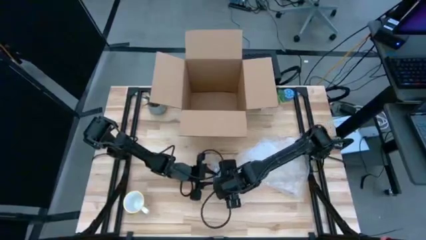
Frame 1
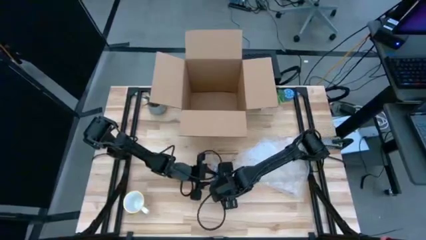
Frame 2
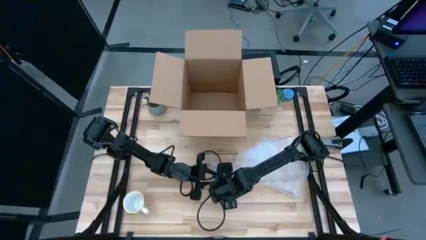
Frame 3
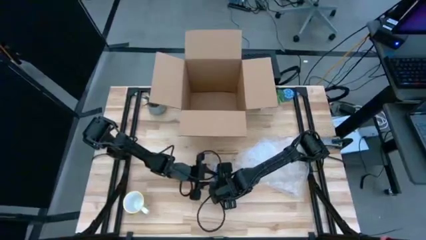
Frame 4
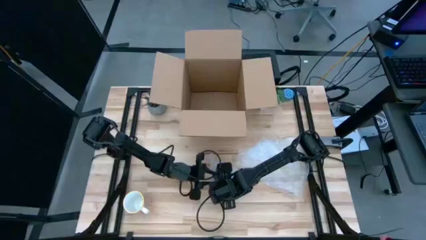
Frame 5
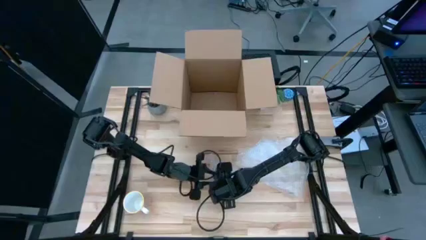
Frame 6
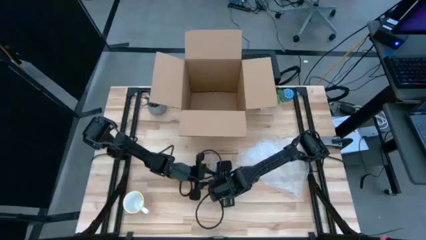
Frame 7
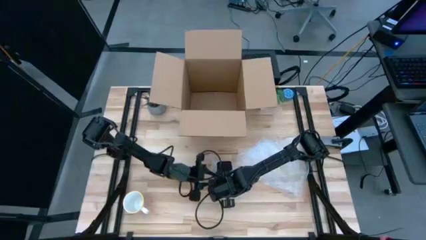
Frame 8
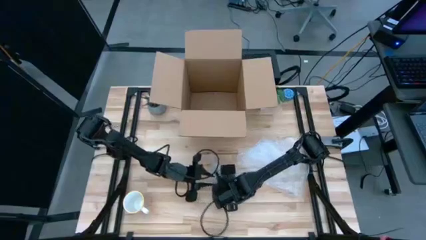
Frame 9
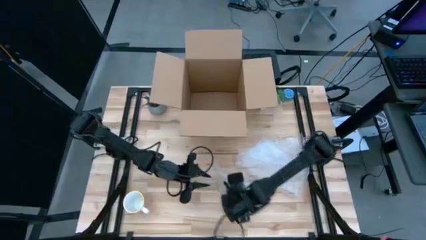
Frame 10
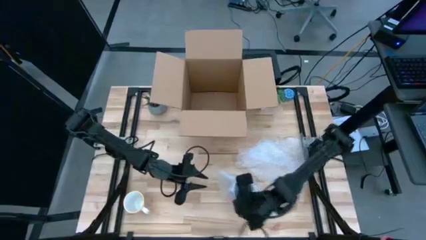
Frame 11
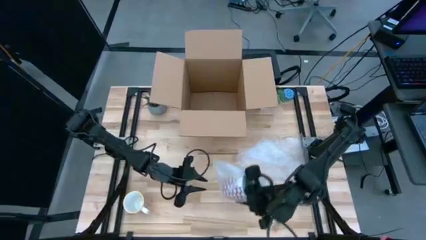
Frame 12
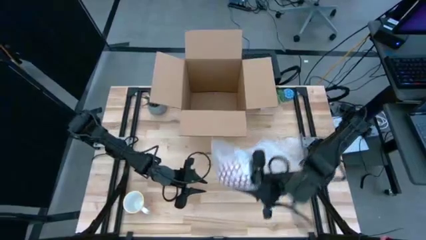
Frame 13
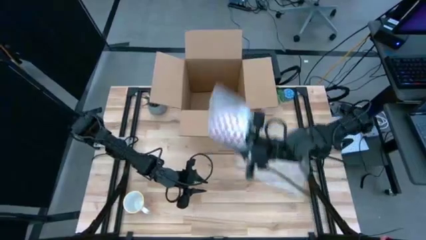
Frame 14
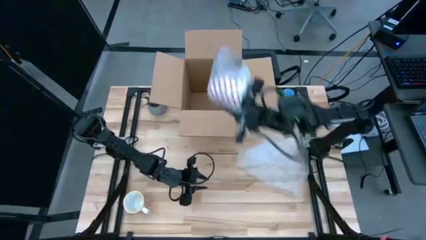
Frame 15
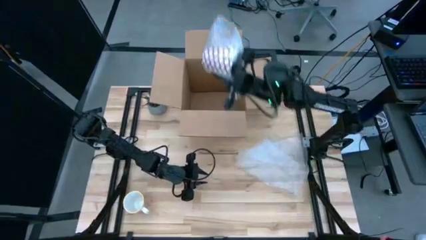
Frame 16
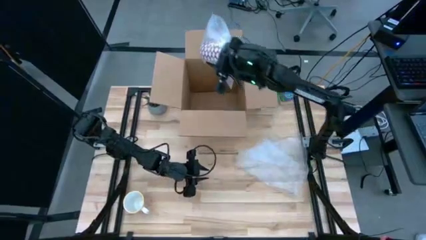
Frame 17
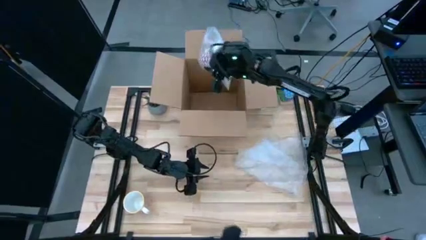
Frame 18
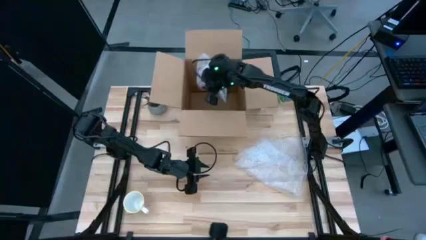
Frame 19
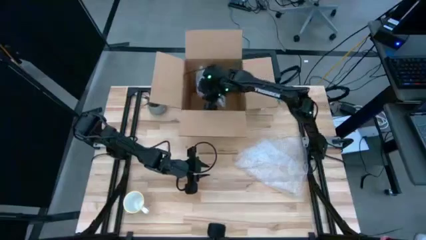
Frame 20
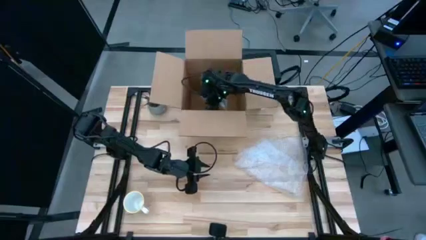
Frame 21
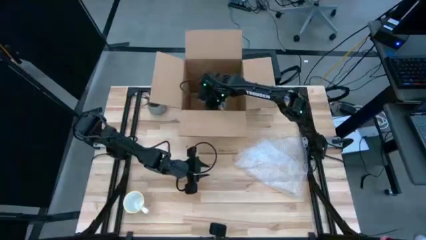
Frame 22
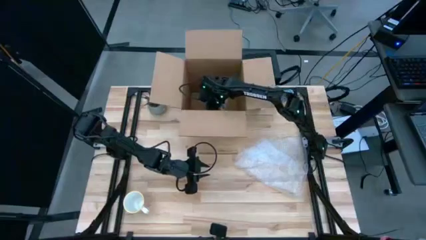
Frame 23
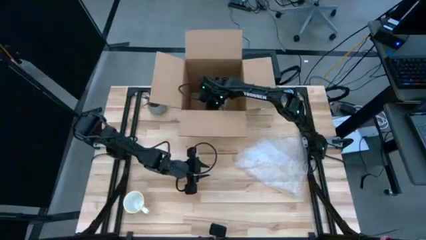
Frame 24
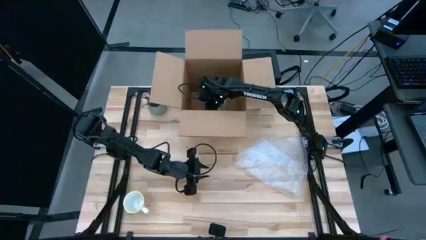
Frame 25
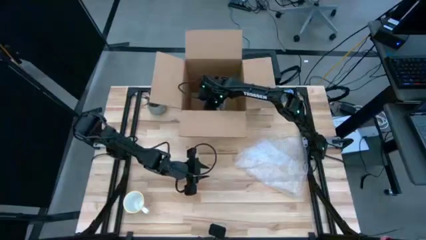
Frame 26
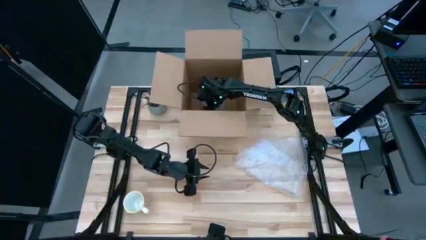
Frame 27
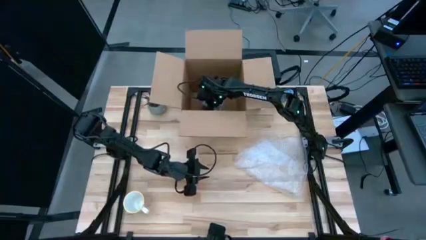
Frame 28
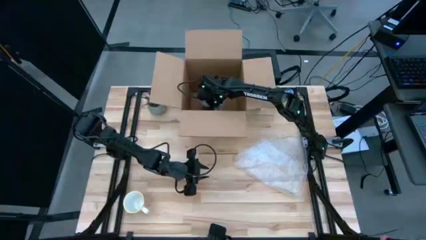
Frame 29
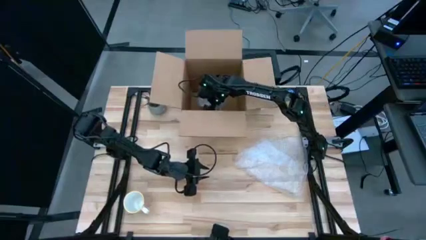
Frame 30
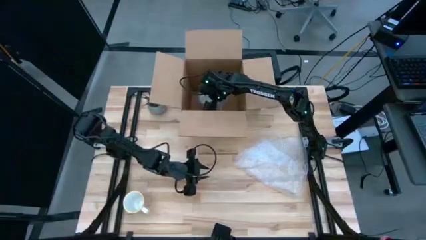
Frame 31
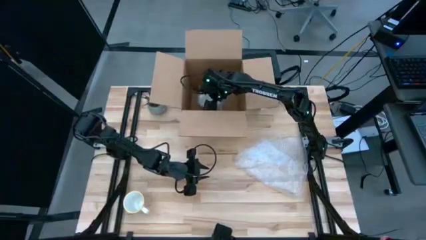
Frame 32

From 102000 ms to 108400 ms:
Task: wrap mug
Put the wrapped red mug into the box

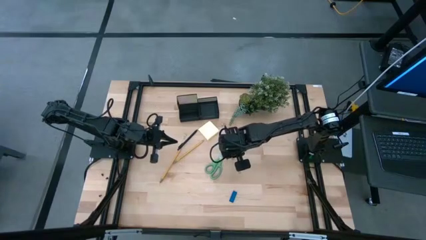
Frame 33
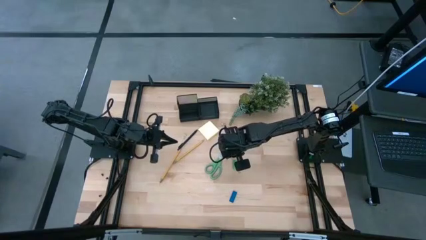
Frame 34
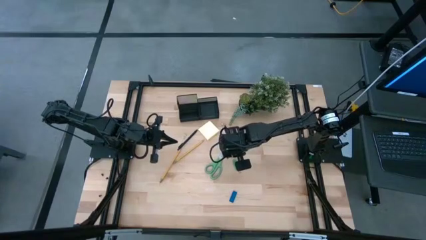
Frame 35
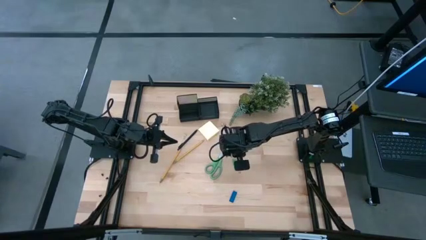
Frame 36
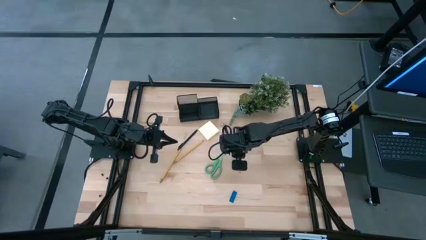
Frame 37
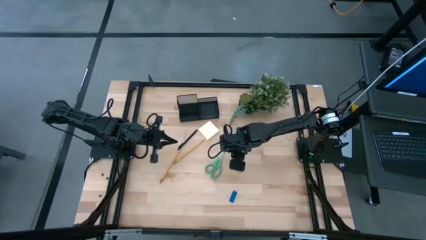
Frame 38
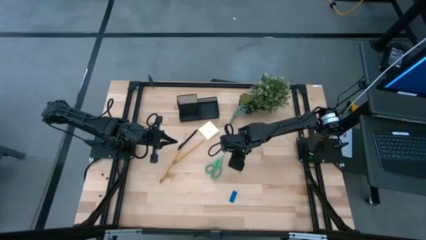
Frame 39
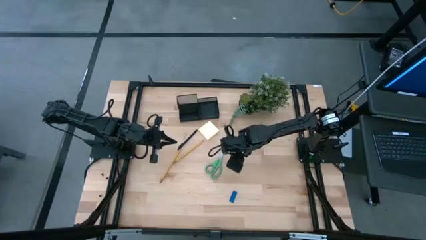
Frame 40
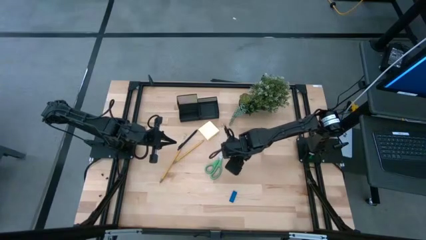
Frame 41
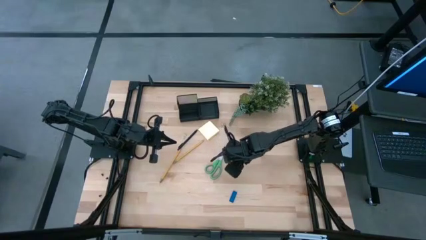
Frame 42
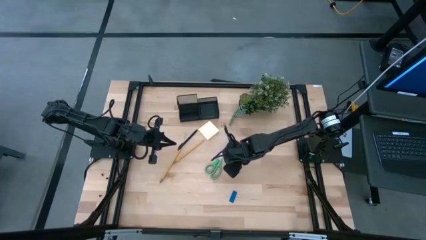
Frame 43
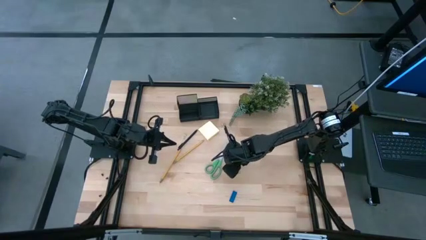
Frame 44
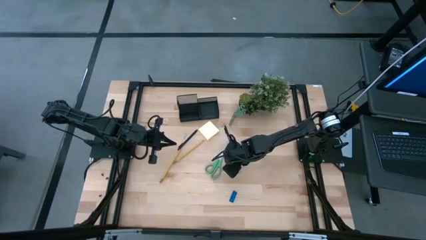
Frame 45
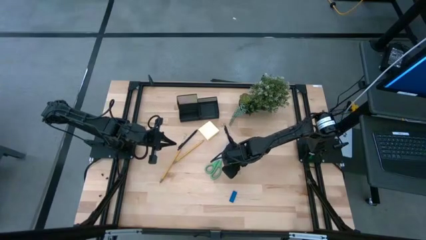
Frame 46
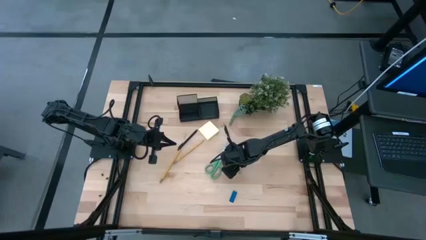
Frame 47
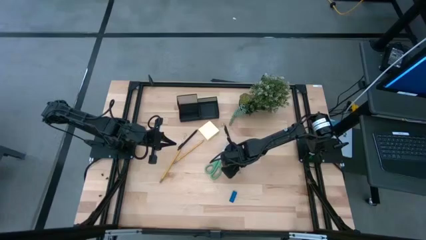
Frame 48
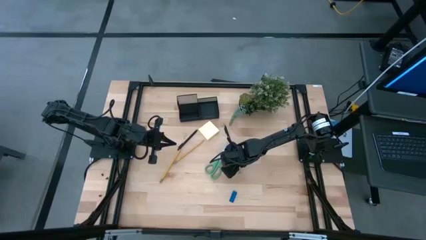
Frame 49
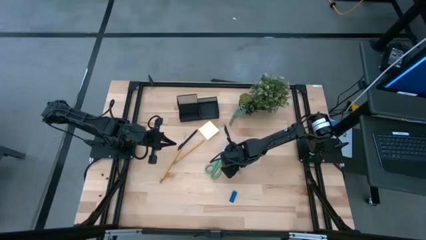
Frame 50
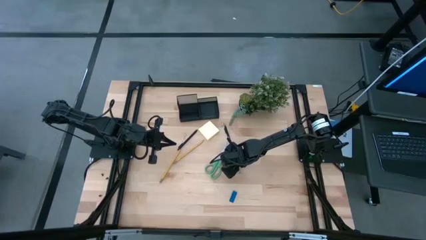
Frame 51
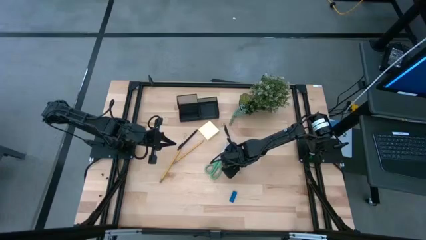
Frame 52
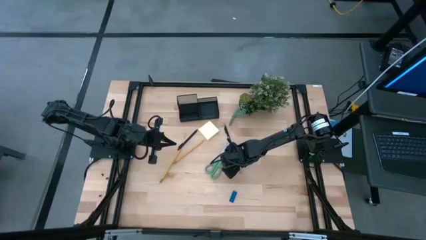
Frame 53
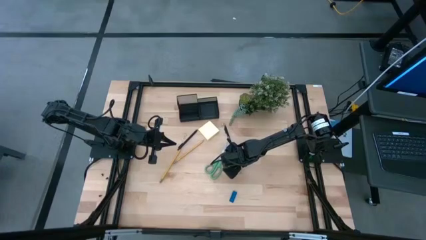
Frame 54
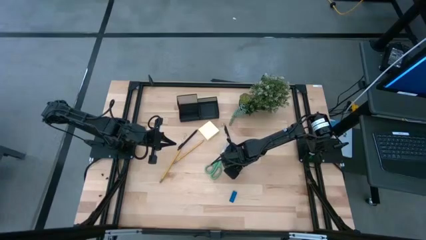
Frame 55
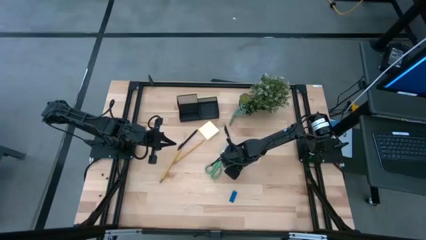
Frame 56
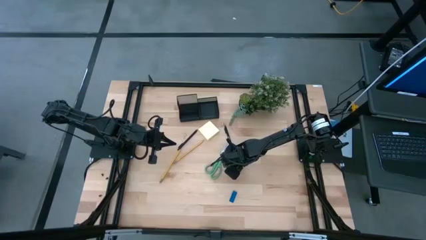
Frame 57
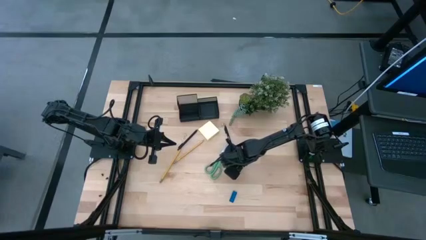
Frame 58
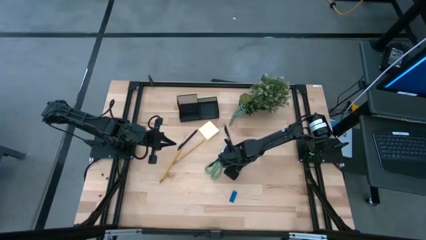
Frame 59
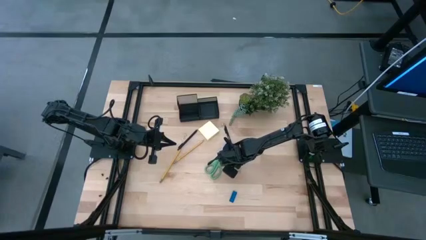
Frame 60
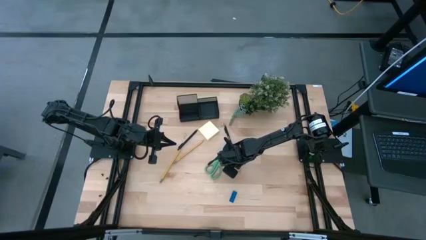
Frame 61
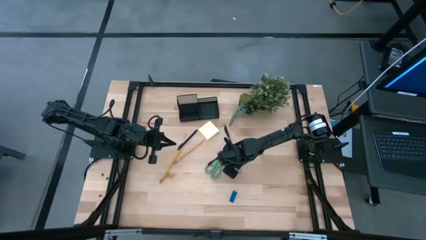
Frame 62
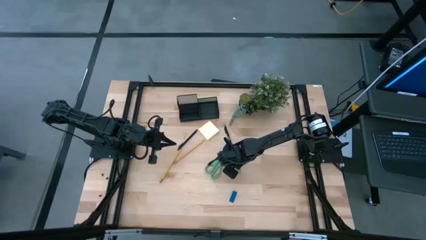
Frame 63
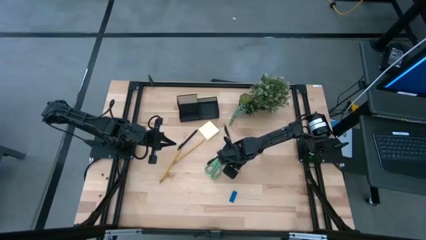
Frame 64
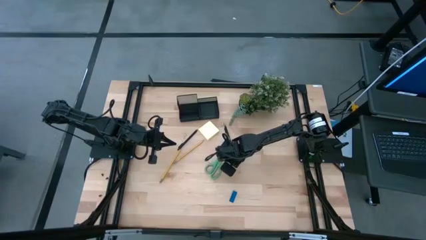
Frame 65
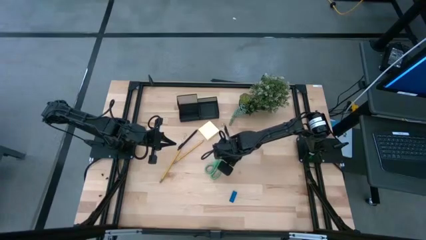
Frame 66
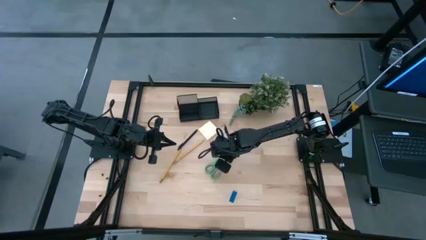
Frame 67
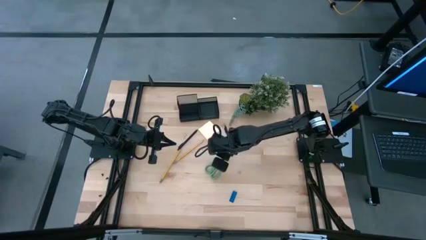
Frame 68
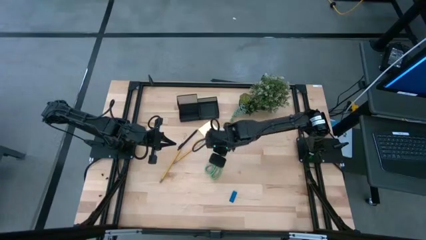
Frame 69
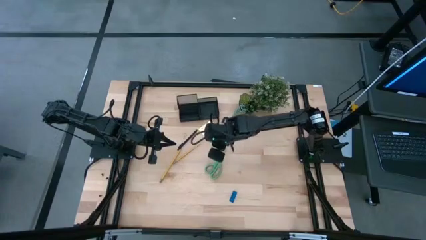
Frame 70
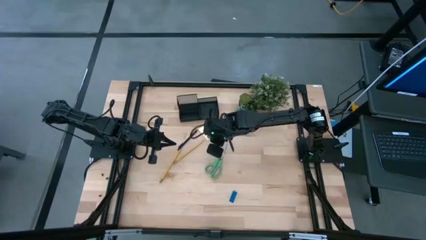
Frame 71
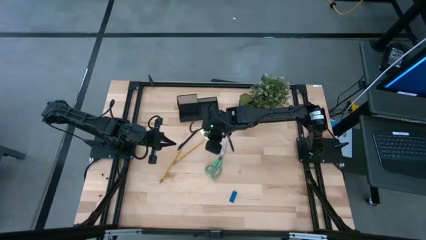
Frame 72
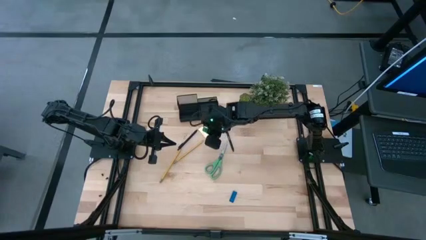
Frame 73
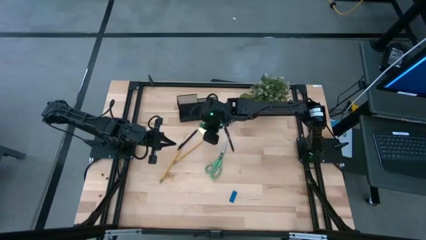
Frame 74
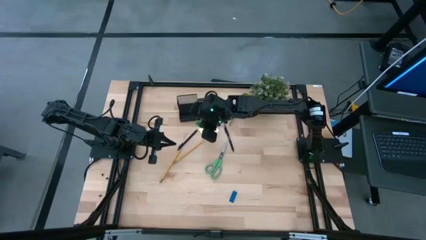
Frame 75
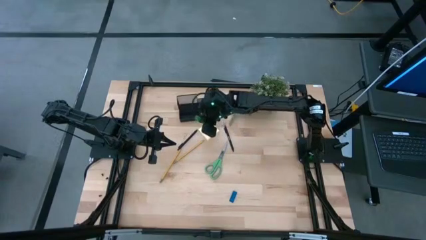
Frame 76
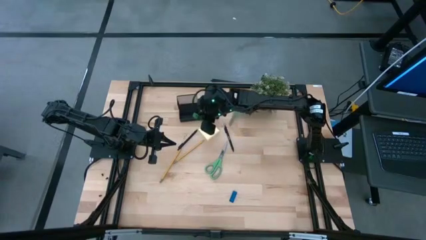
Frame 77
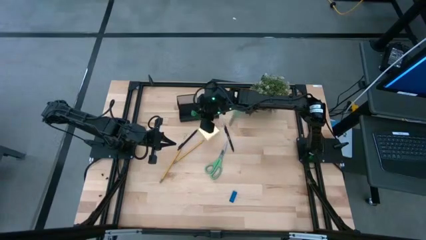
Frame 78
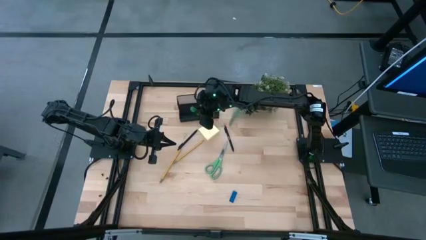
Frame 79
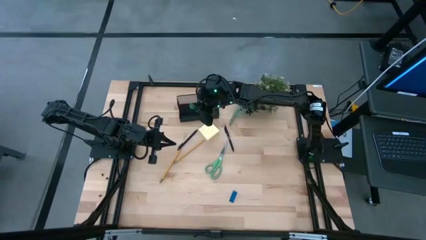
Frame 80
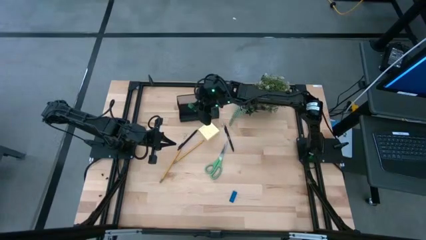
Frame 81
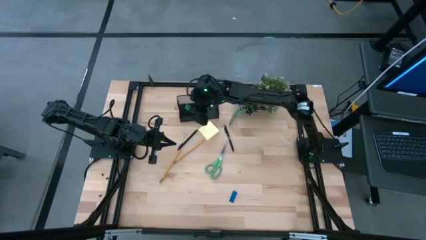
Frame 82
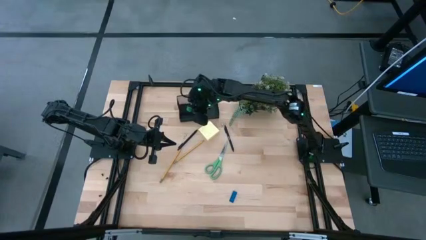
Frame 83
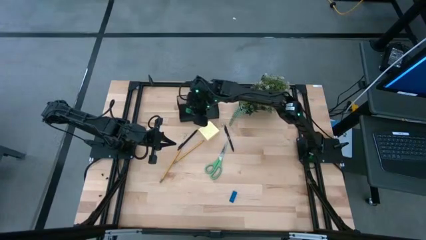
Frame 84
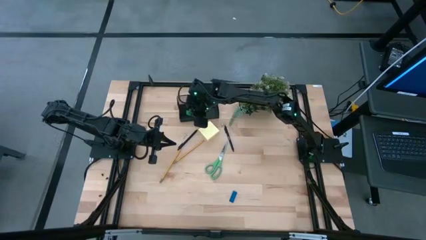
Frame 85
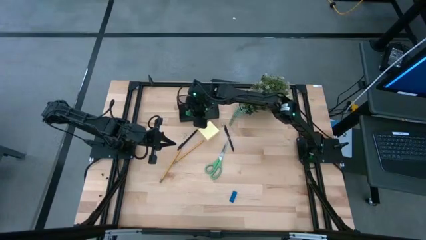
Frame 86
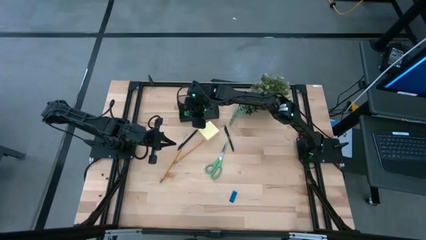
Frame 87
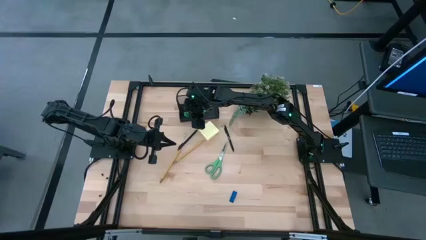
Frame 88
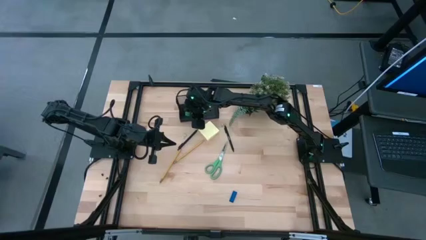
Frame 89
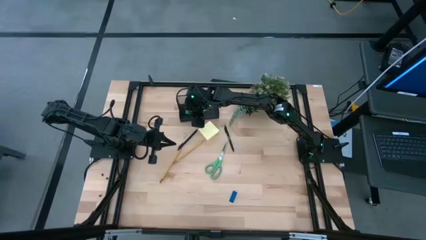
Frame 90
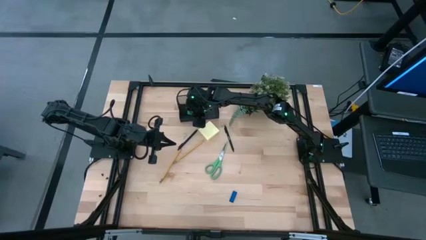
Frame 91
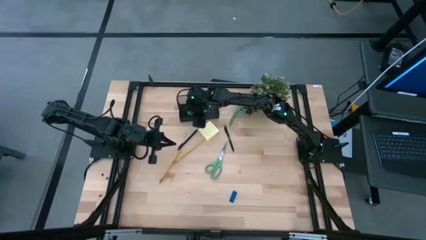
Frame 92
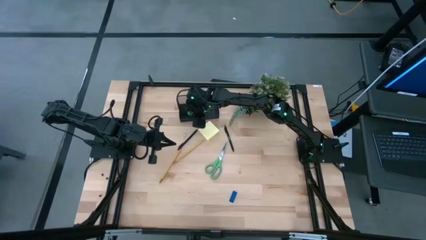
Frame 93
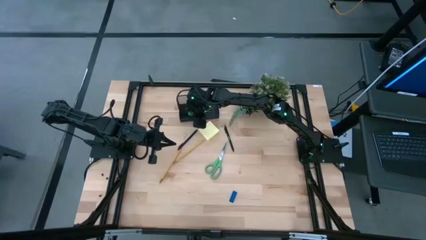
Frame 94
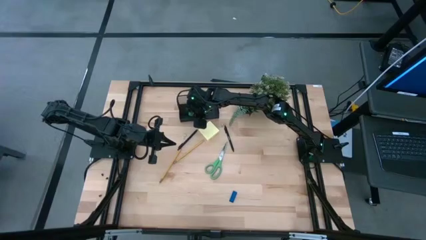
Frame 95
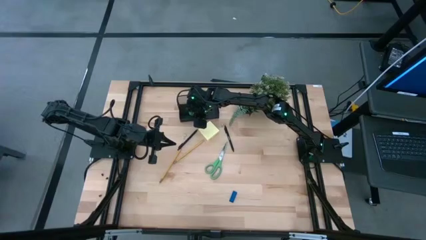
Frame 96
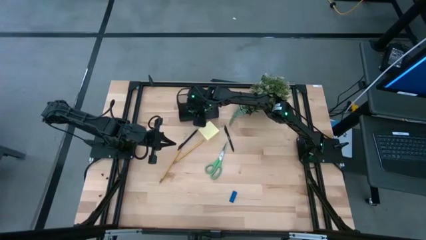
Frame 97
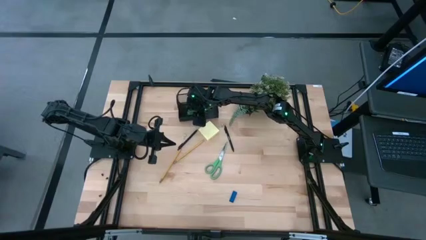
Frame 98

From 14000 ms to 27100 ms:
Task: Pick and place office supplies into organizer
Put the green eraser into the black desk organizer
